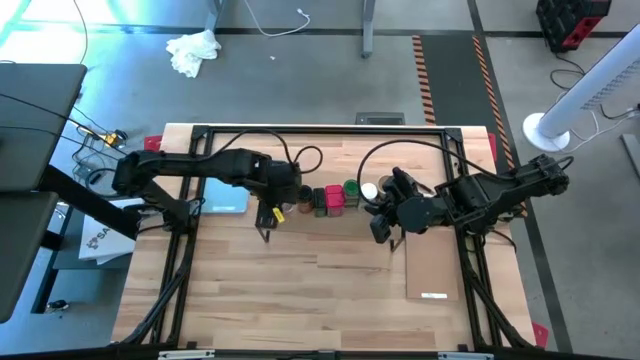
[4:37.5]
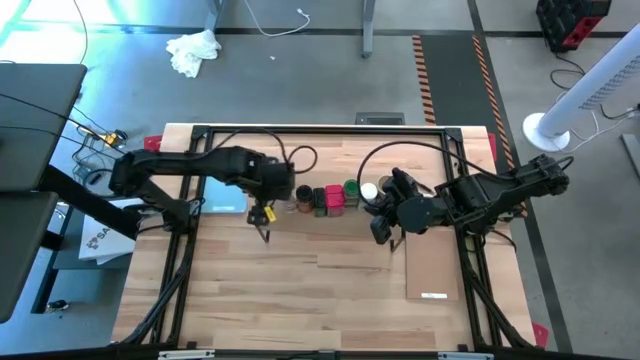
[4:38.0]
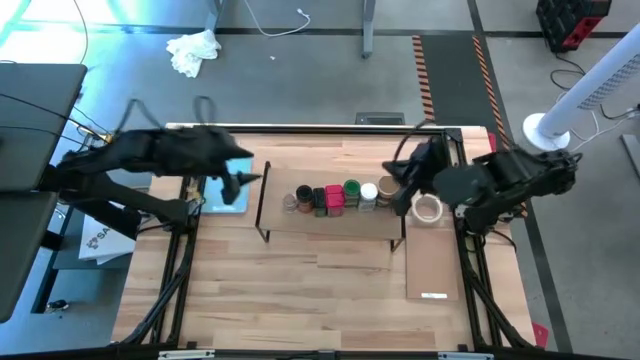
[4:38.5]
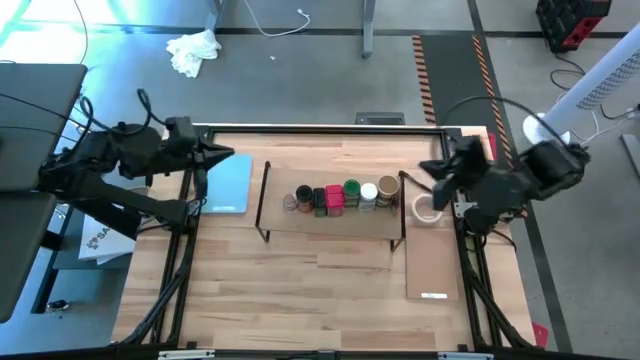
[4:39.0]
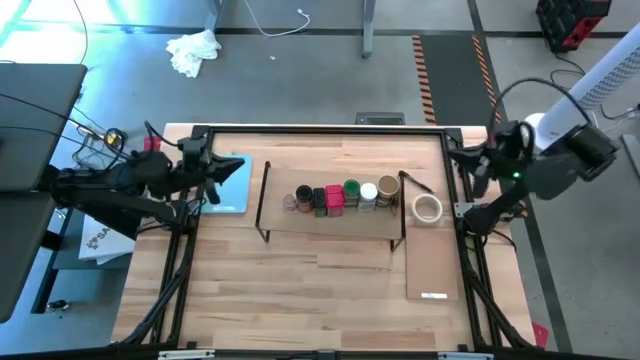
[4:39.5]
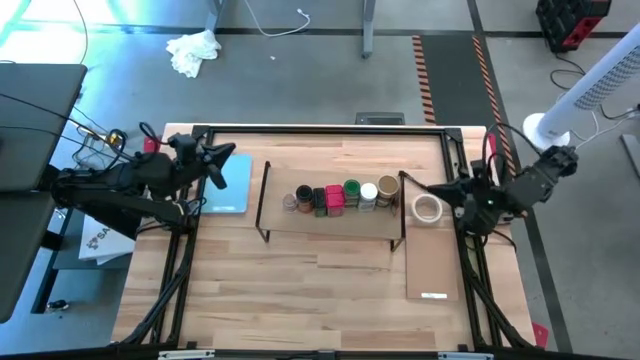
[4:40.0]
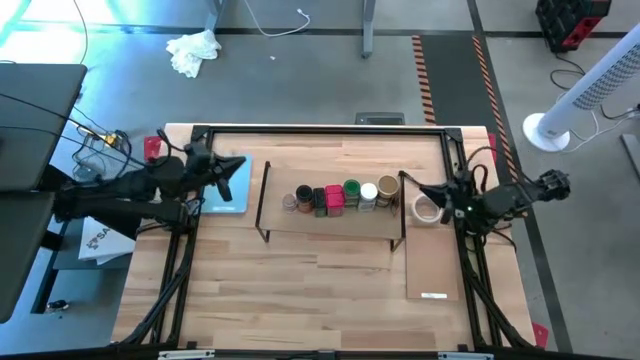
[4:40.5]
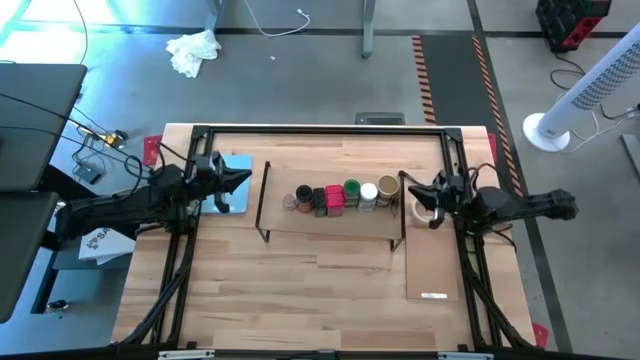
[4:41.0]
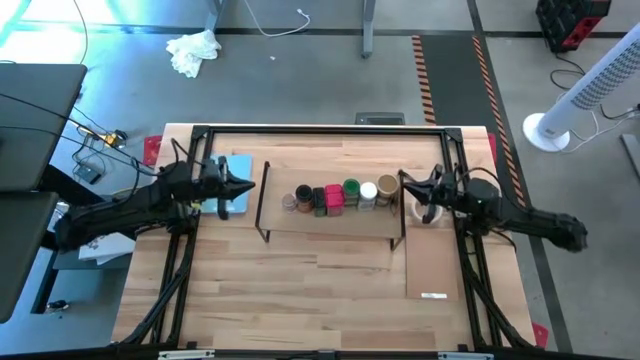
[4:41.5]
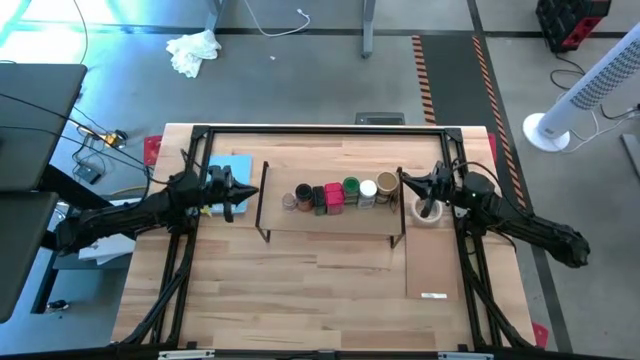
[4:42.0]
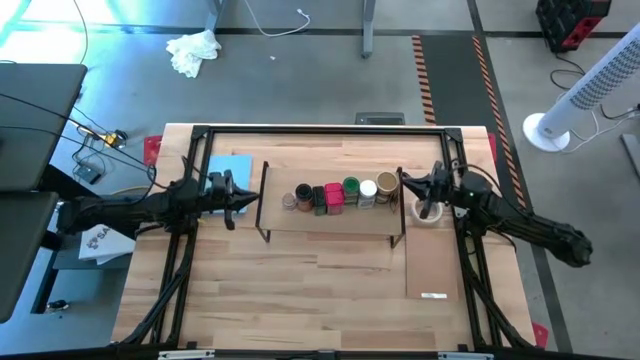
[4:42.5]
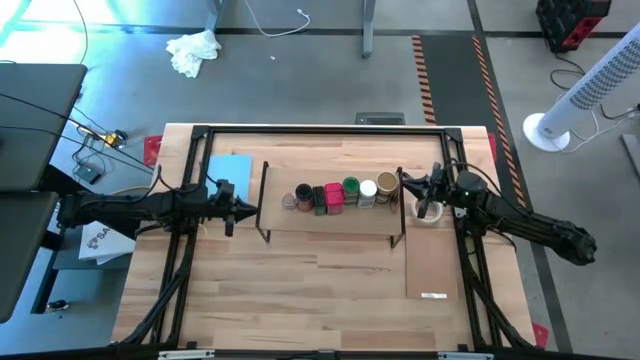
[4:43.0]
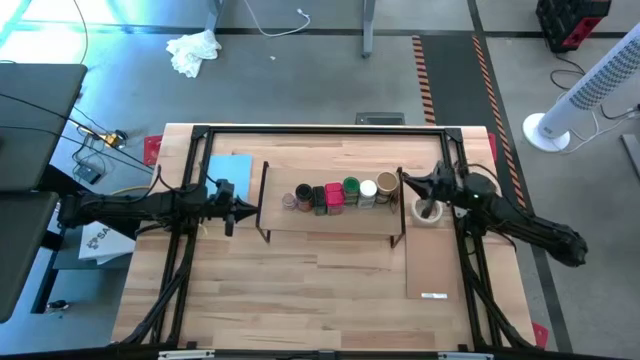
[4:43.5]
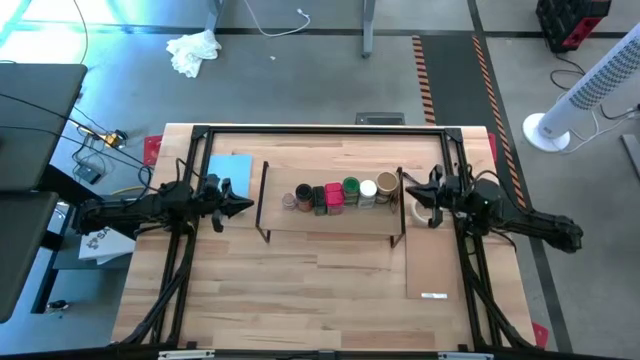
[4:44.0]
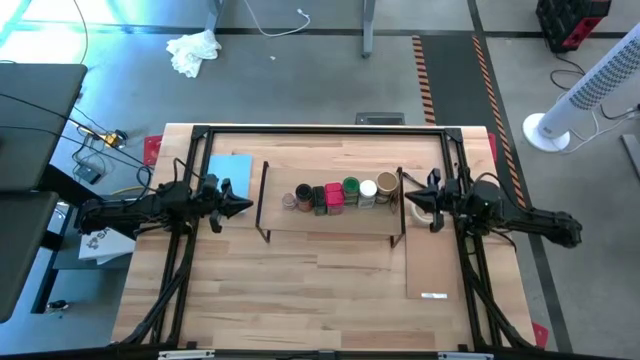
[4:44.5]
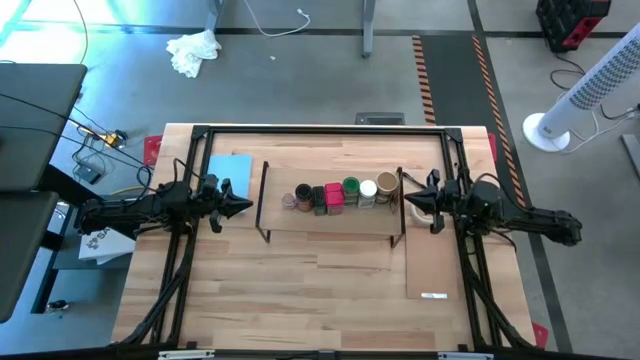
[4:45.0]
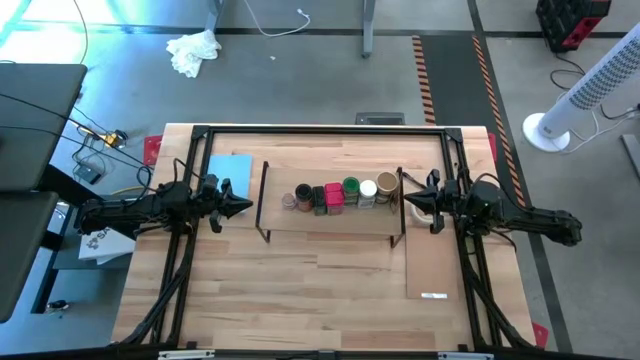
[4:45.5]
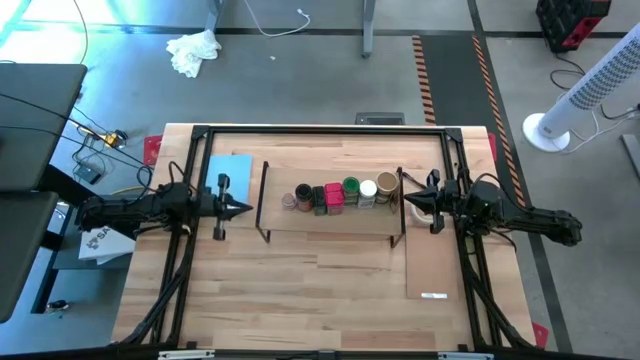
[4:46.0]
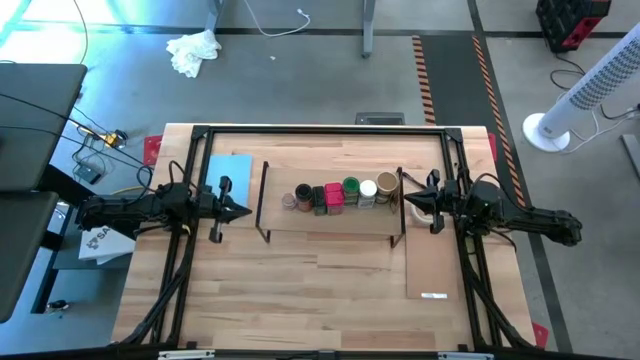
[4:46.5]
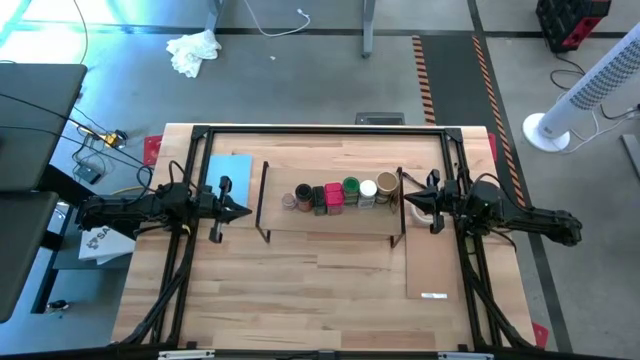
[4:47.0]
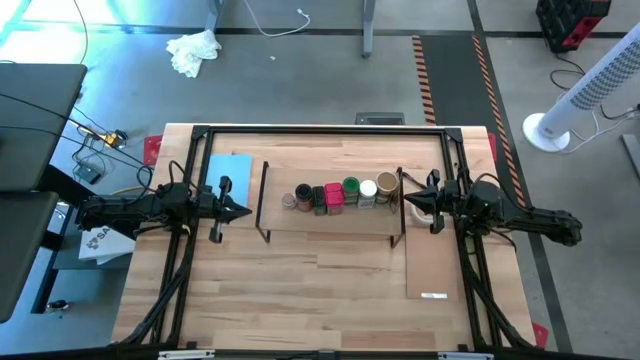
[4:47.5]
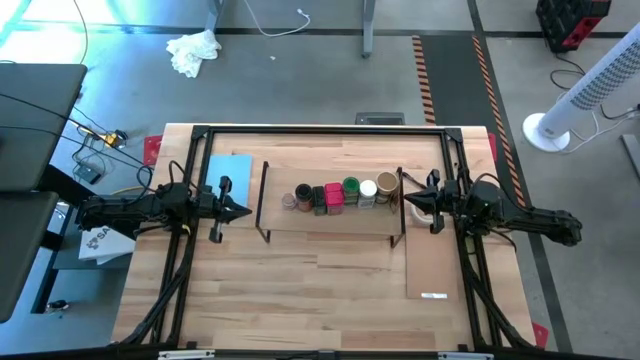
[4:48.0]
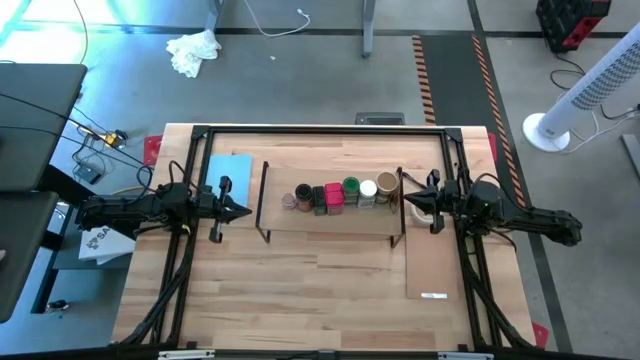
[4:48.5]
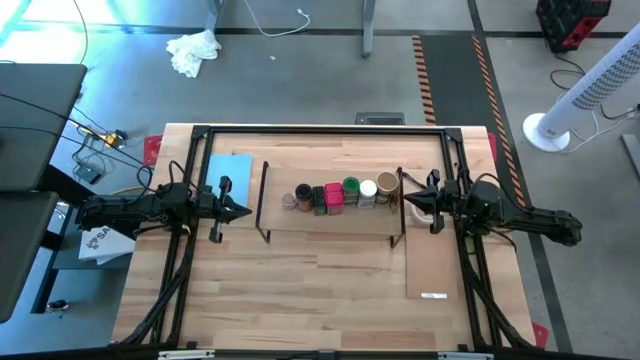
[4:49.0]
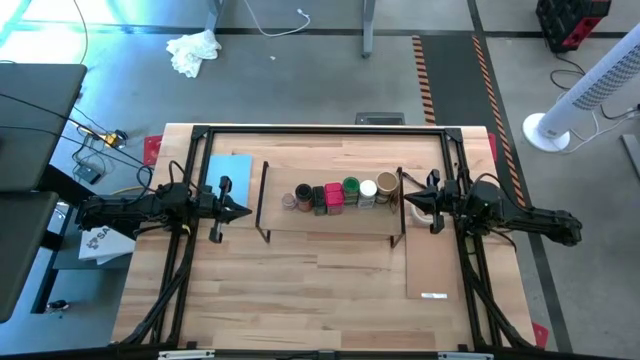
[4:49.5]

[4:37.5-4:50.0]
Task: Shelf spices
Return to Home Position
